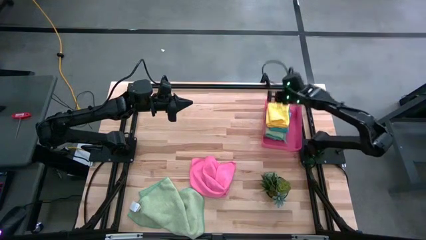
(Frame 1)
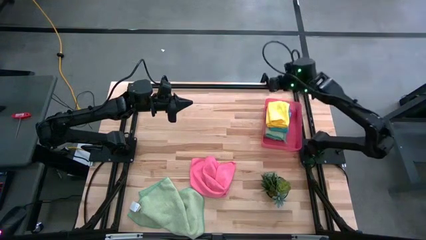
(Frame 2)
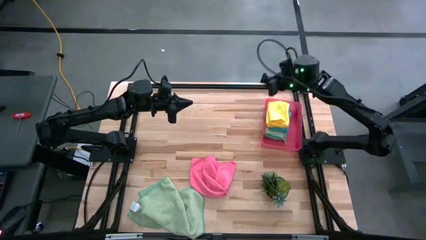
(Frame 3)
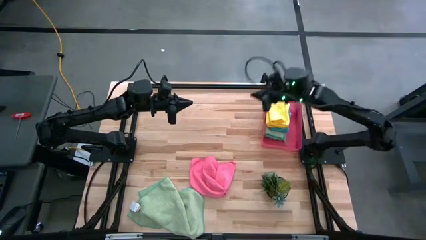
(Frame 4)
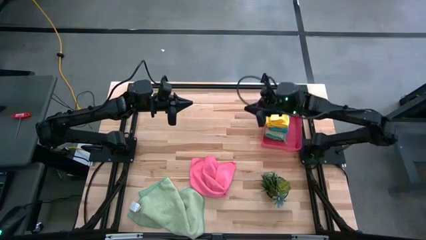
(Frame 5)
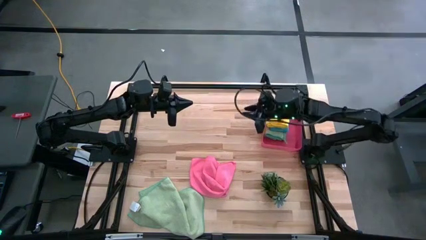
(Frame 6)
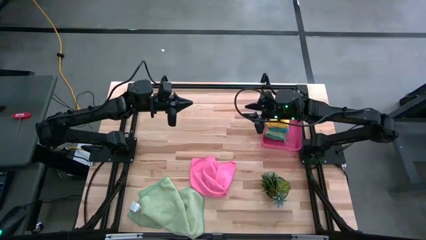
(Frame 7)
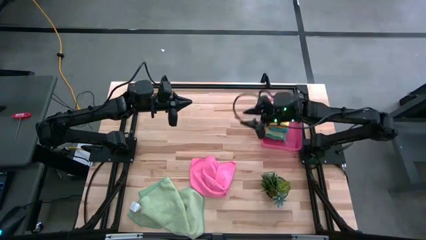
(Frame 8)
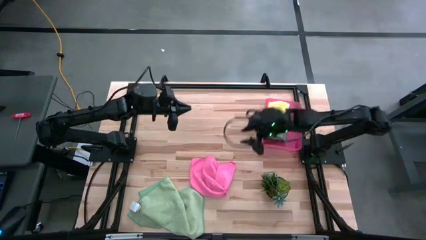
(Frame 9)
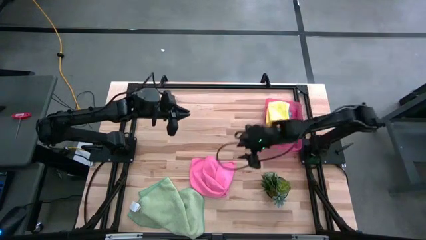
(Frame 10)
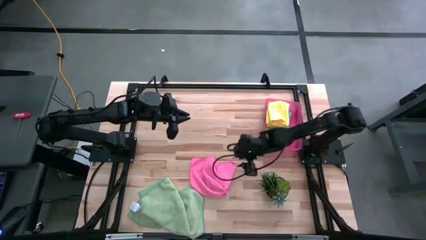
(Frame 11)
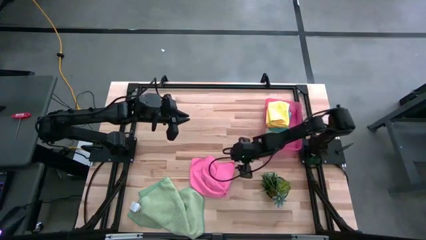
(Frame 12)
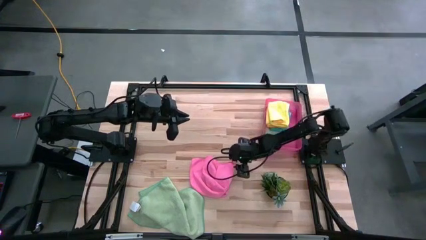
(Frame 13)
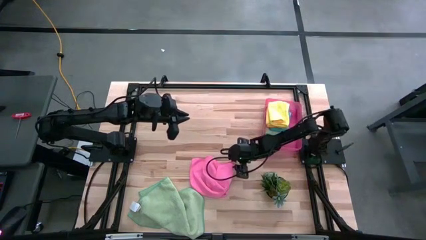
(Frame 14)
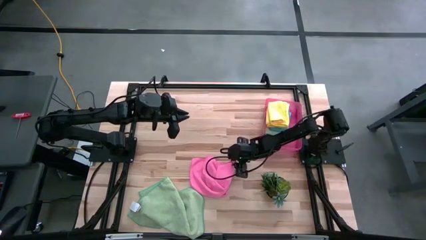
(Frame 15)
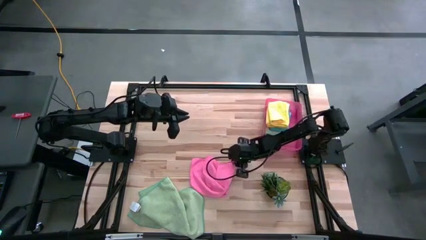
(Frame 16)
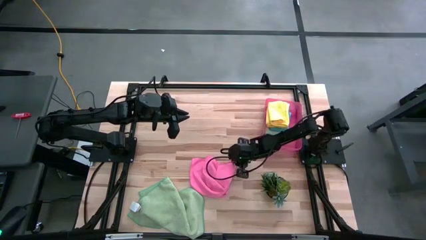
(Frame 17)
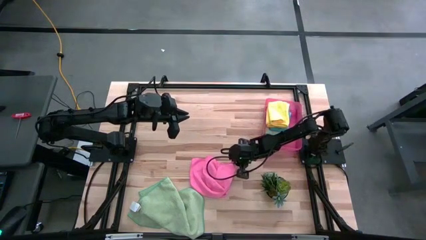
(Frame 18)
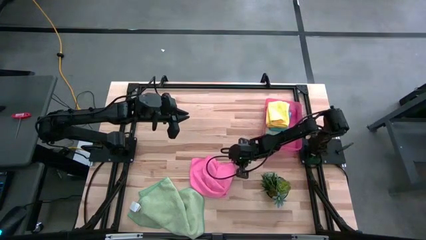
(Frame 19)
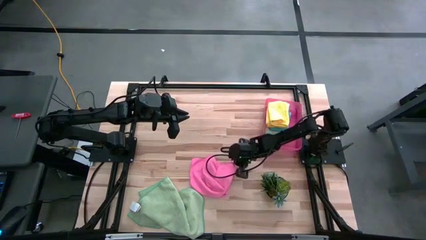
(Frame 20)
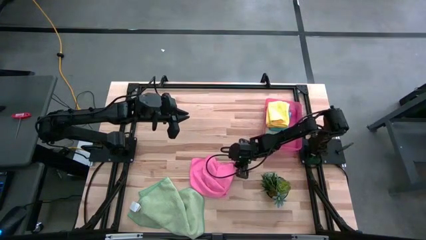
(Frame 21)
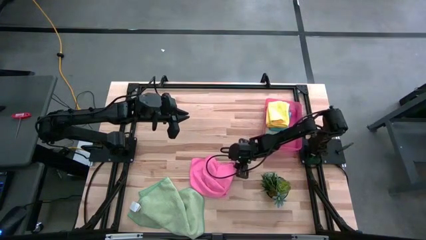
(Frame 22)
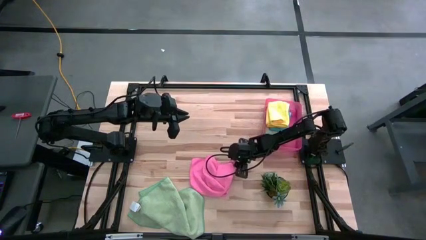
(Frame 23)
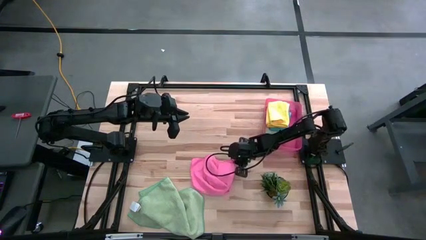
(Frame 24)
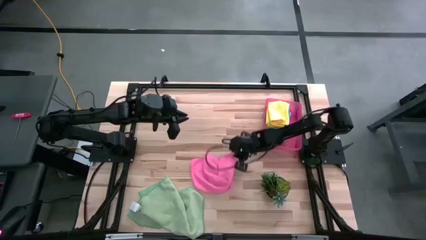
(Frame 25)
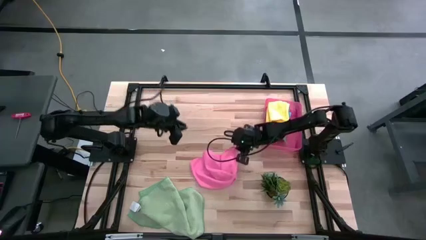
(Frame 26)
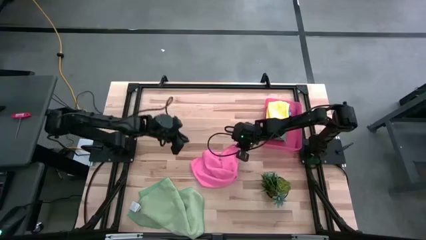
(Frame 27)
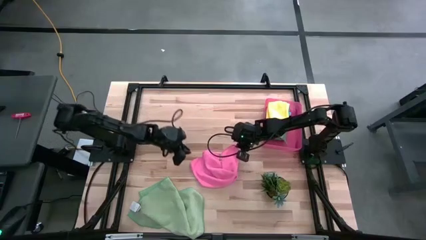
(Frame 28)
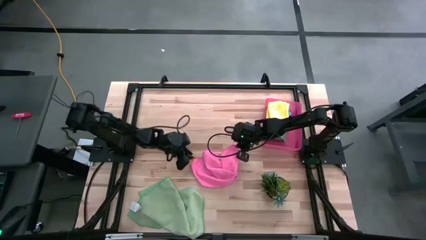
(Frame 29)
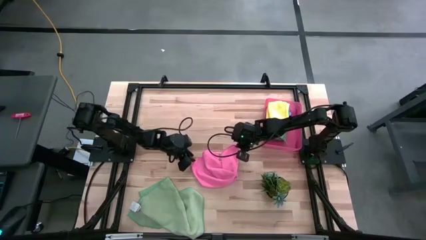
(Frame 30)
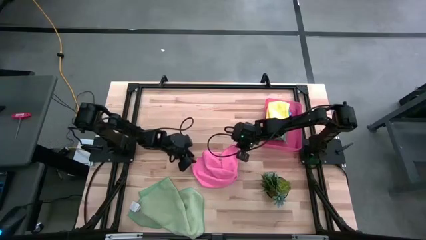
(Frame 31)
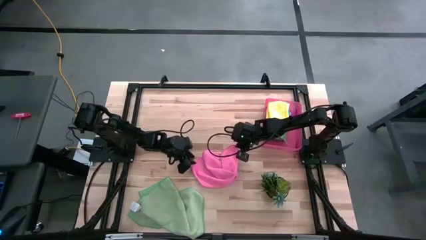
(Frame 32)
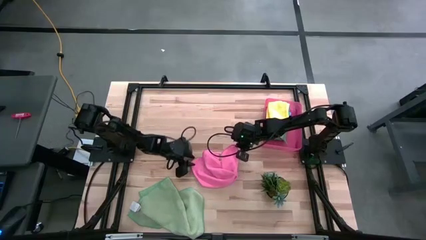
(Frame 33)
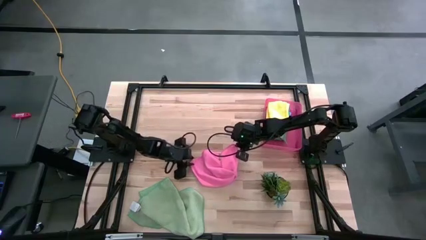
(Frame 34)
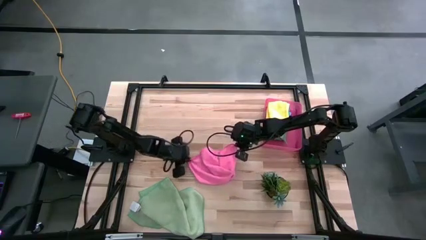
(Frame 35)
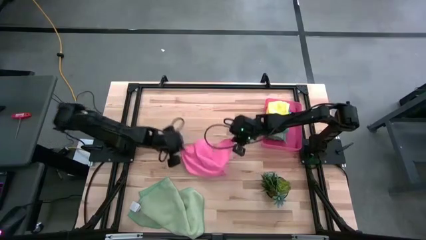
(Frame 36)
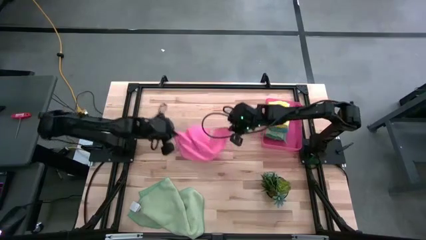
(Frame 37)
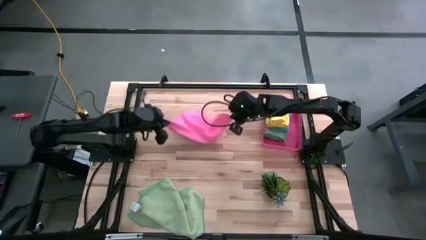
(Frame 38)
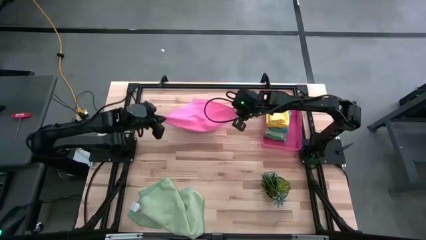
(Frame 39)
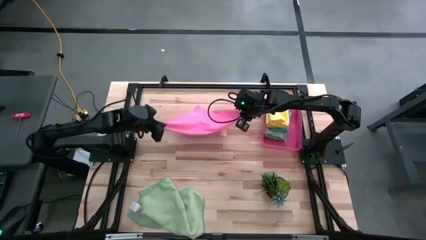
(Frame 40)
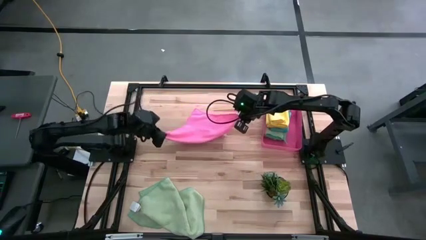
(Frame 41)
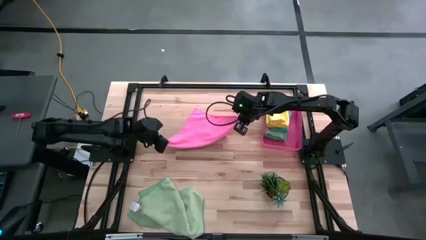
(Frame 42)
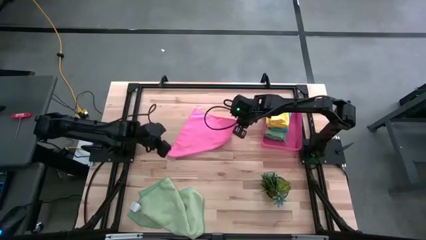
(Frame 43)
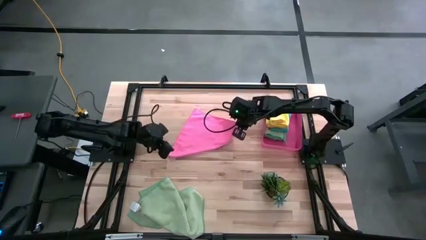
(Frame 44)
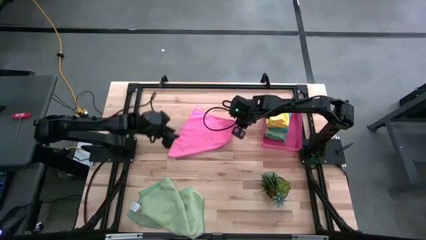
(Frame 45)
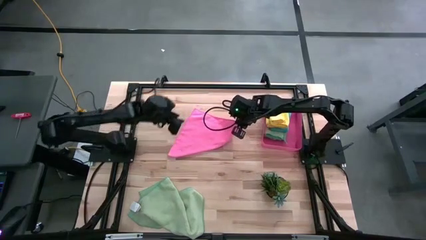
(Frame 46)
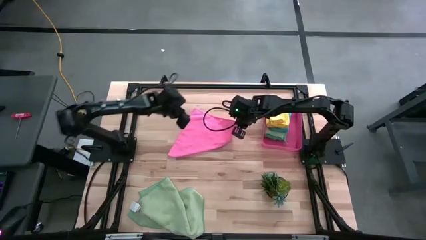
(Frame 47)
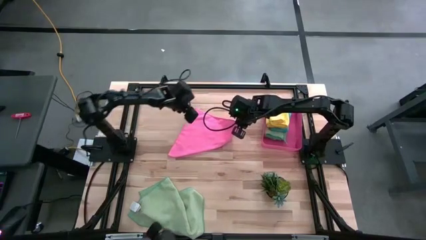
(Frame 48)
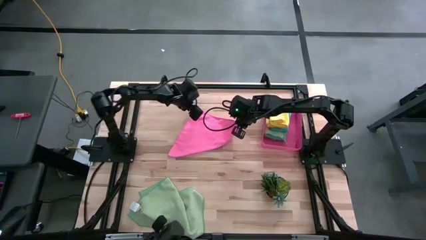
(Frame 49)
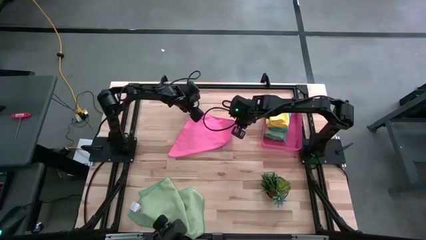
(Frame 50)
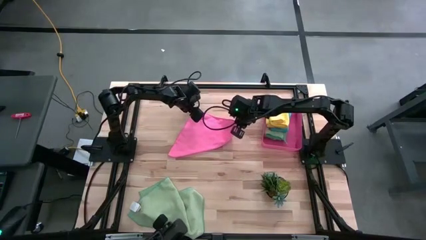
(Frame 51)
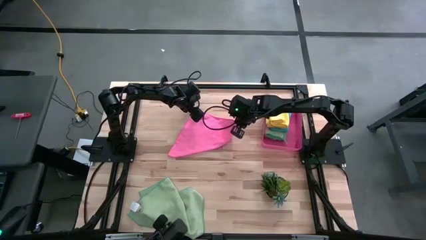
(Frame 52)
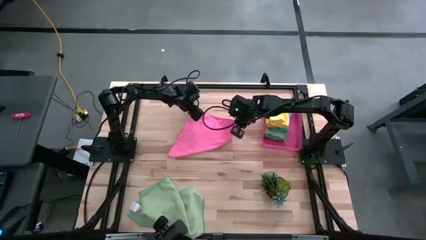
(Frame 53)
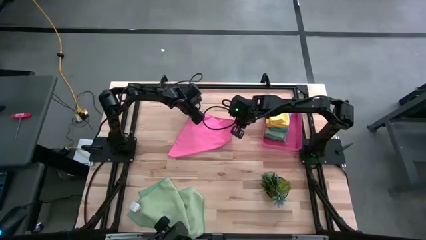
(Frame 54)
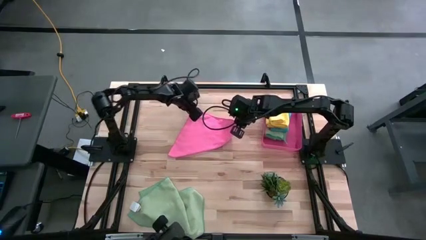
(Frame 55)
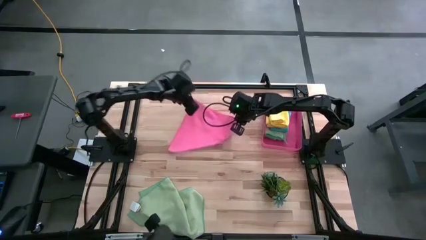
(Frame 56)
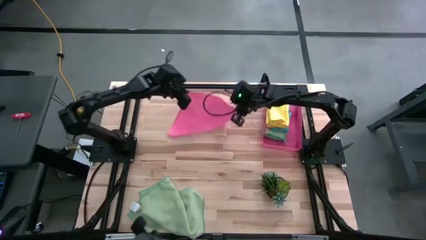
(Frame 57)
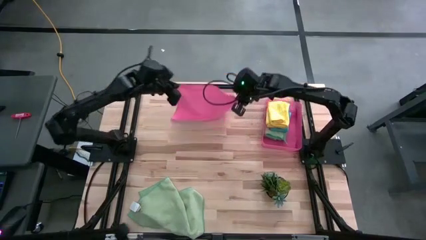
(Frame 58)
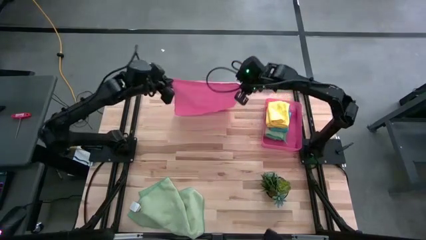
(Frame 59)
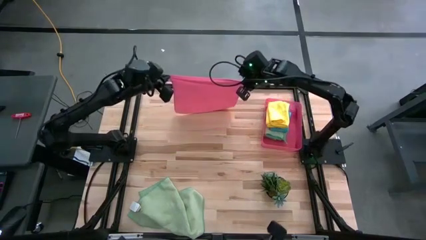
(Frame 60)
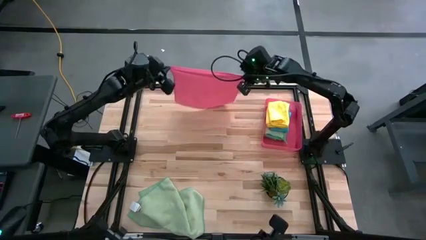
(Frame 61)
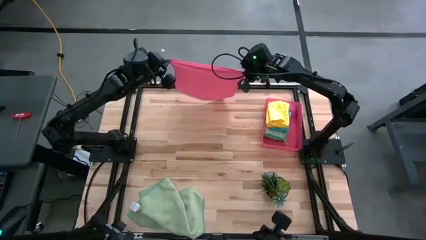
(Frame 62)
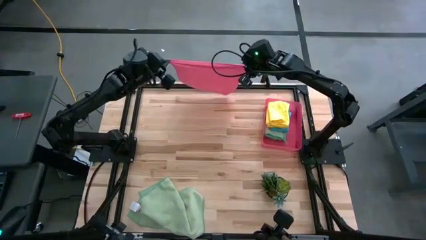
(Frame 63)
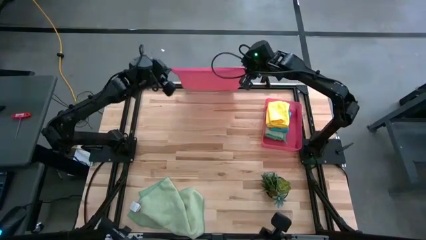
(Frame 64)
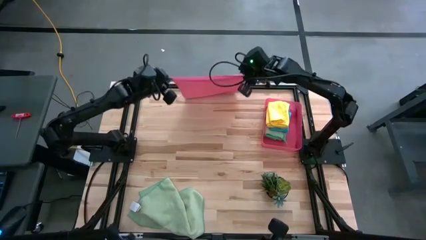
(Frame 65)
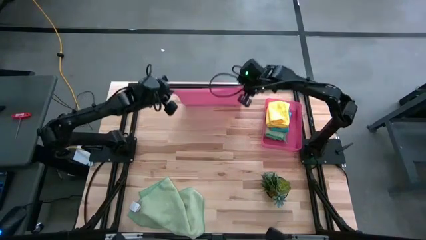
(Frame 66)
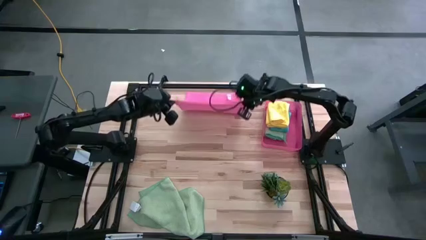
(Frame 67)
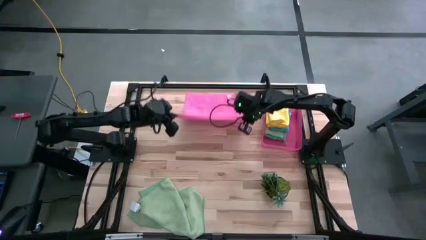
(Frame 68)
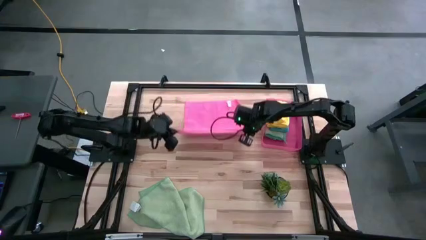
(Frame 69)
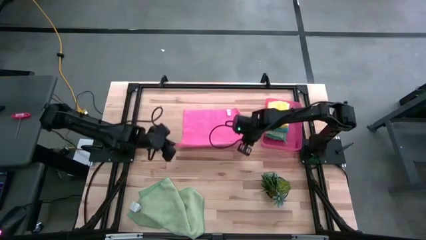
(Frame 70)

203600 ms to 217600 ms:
Task: Fold microfiber towels
Fold the pink microfiber cloth

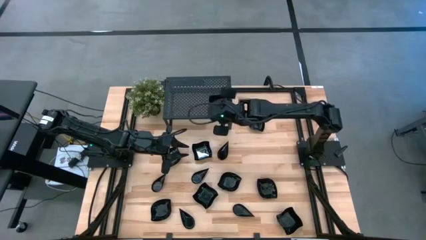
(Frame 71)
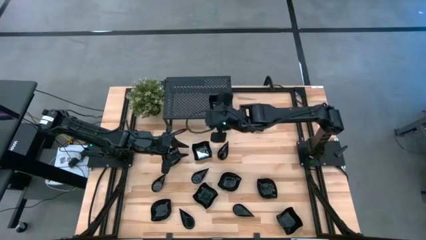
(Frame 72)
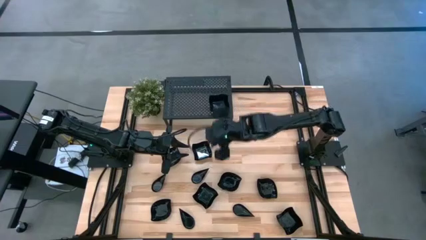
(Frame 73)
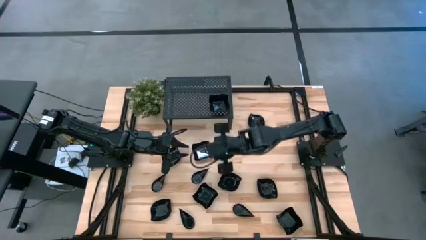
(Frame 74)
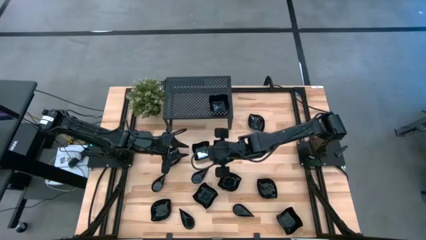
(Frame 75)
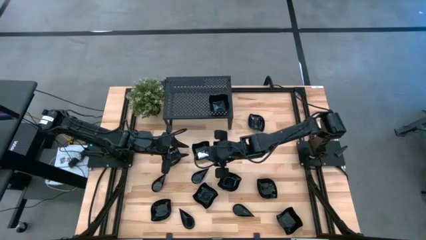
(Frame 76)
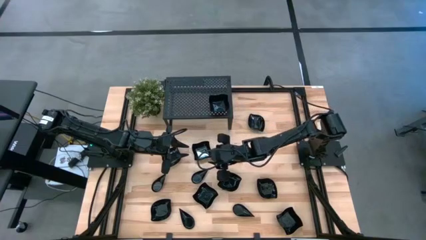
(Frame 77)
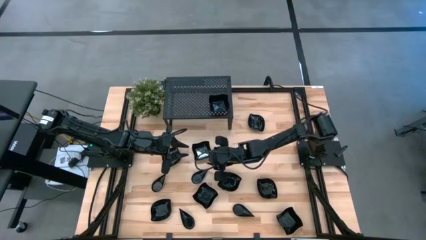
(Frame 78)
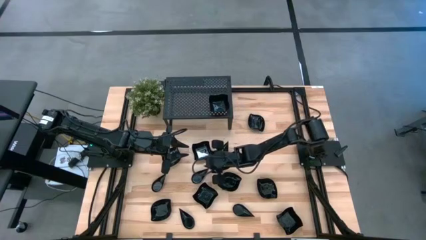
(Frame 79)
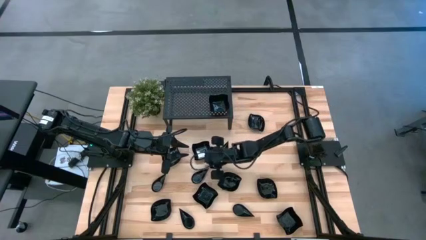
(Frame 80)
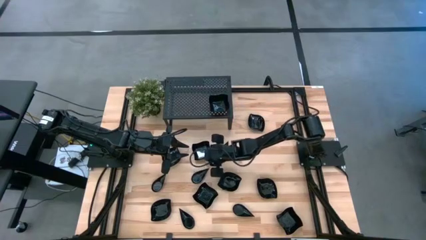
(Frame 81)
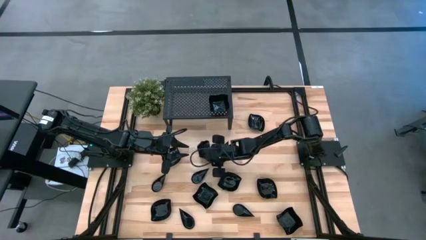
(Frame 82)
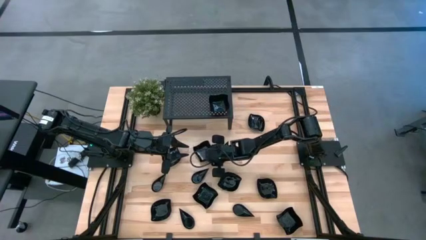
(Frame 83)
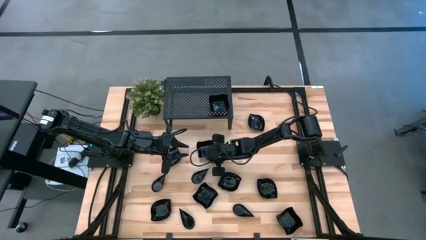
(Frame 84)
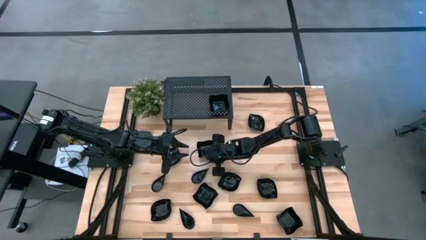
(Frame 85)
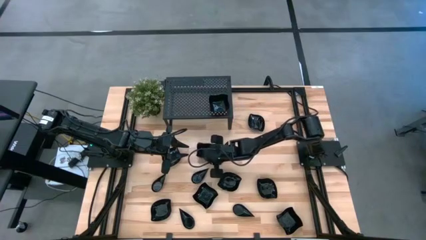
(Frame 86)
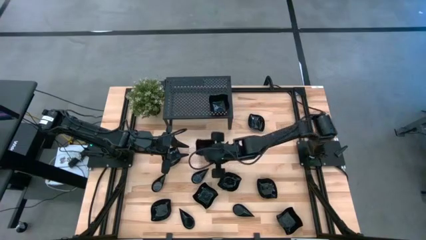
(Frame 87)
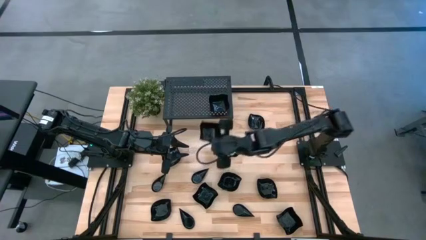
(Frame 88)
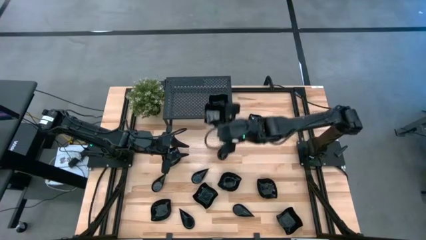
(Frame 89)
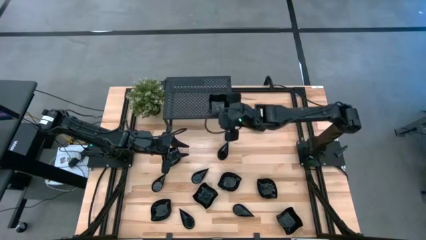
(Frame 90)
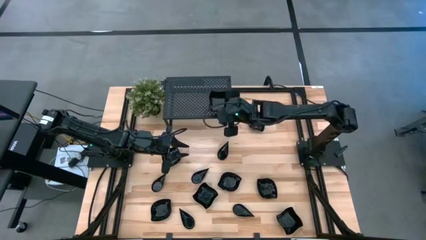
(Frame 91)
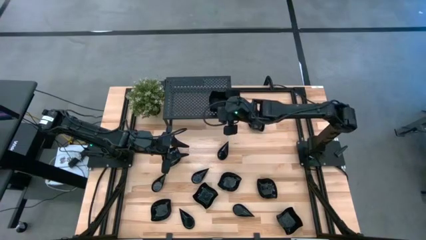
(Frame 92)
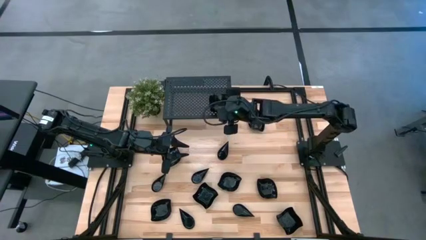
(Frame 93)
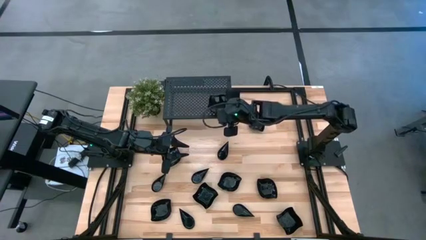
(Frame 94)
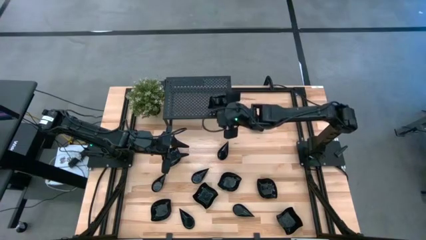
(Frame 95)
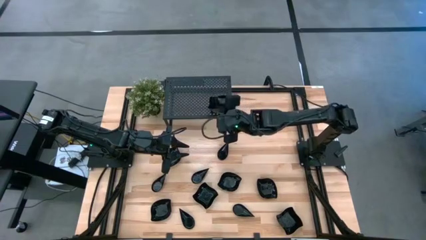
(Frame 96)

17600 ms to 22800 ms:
Task: Pick & Place Mini shaped plates
Stack the black distorted square plate on top of the black distorted square plate on the shelf
